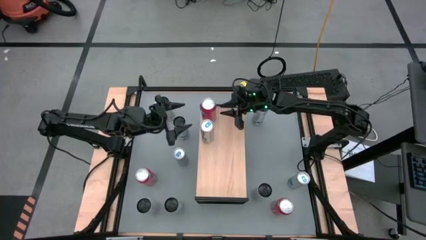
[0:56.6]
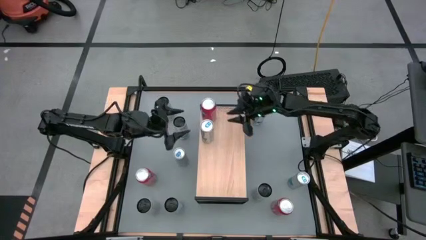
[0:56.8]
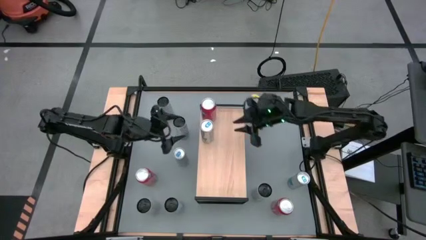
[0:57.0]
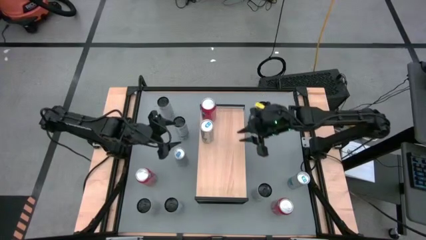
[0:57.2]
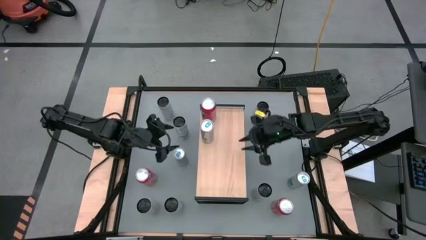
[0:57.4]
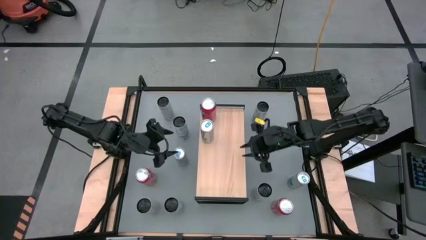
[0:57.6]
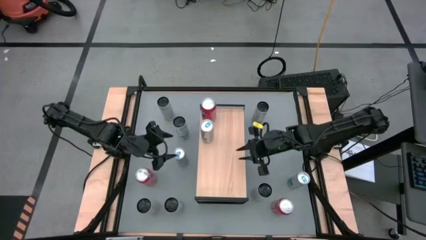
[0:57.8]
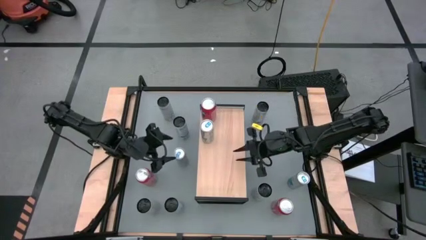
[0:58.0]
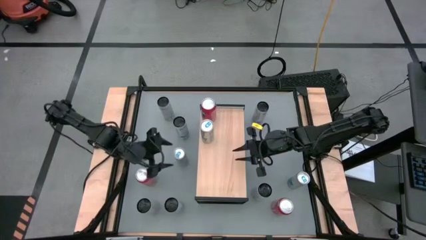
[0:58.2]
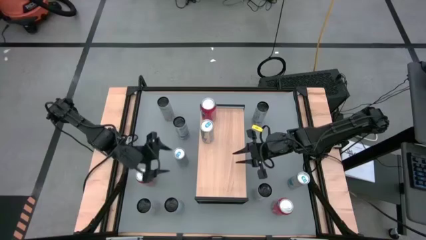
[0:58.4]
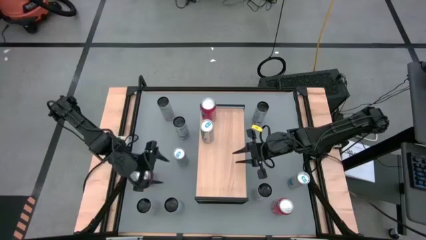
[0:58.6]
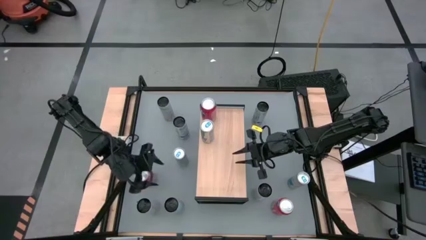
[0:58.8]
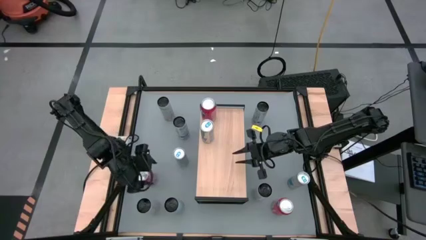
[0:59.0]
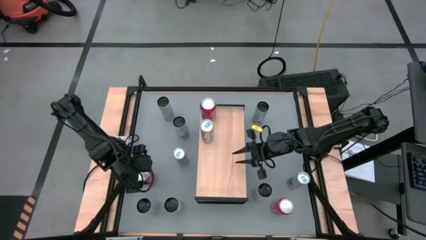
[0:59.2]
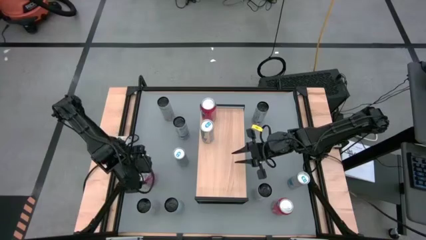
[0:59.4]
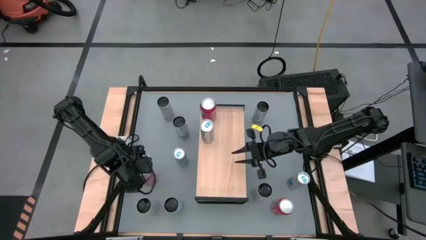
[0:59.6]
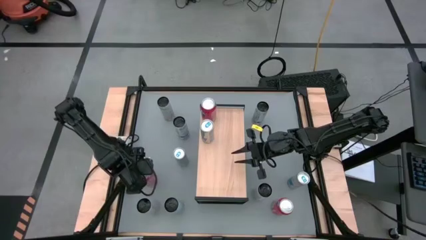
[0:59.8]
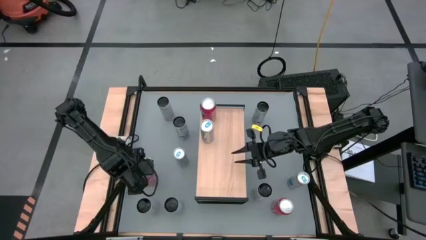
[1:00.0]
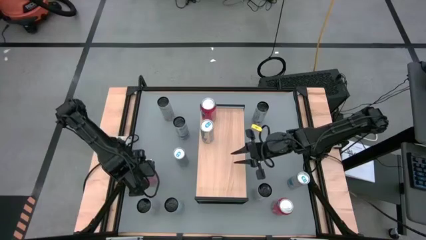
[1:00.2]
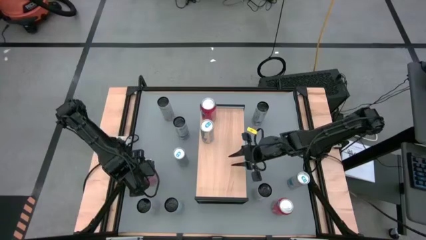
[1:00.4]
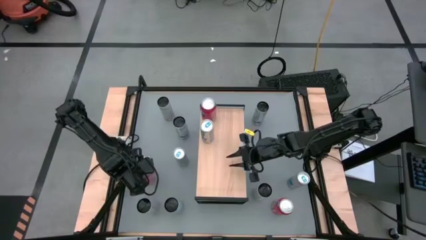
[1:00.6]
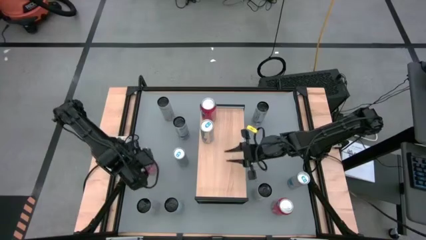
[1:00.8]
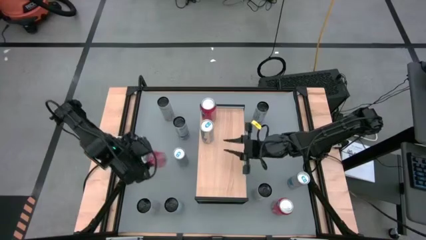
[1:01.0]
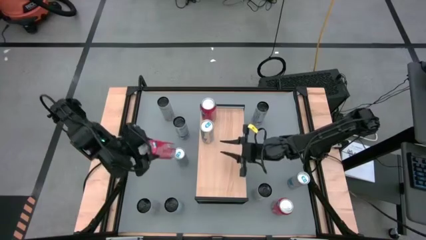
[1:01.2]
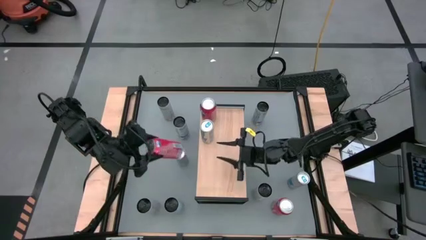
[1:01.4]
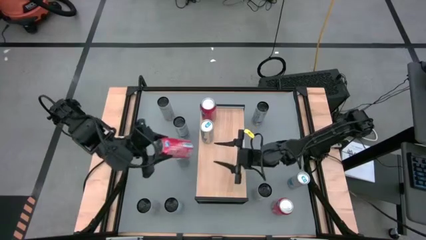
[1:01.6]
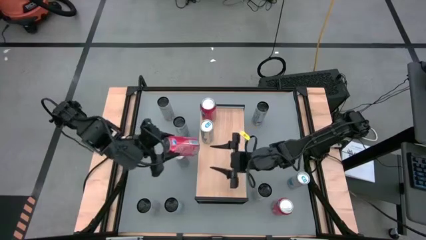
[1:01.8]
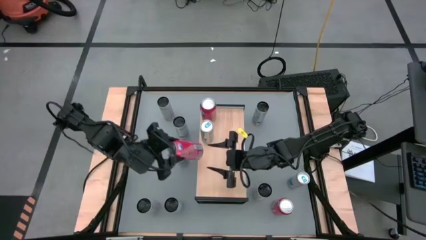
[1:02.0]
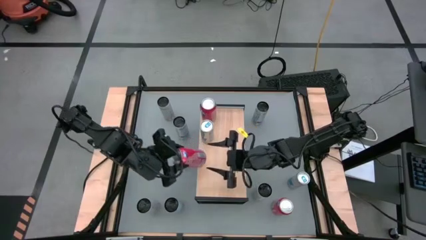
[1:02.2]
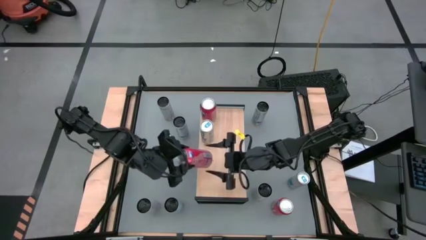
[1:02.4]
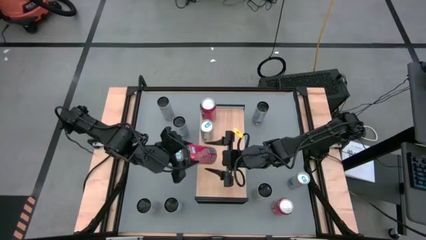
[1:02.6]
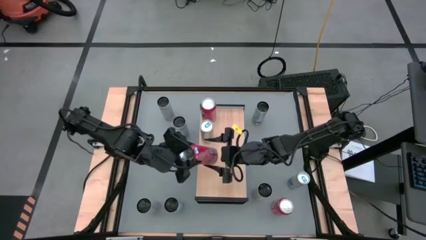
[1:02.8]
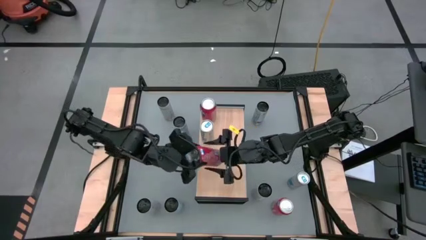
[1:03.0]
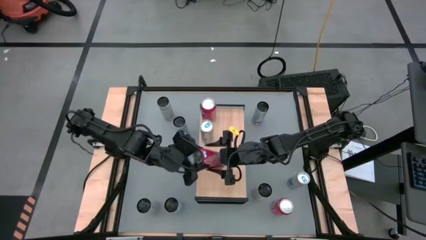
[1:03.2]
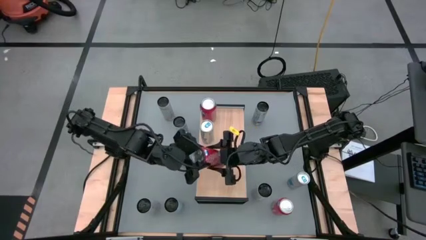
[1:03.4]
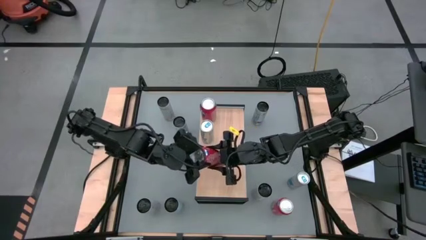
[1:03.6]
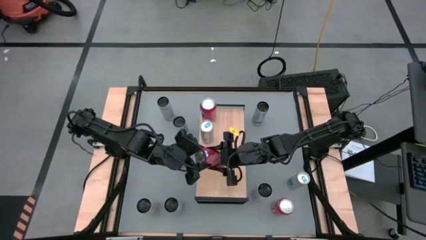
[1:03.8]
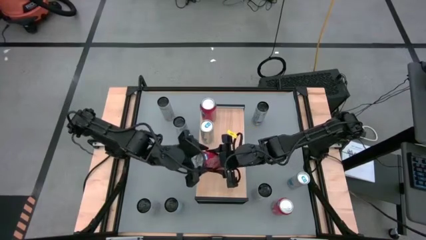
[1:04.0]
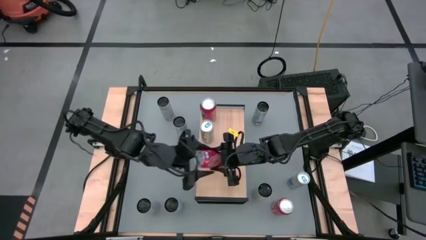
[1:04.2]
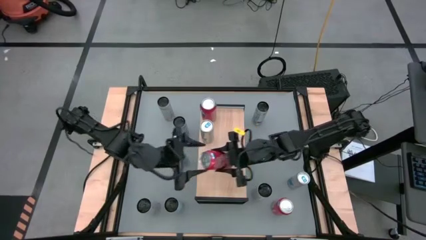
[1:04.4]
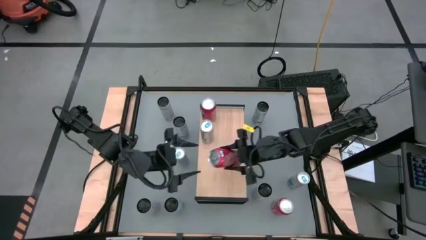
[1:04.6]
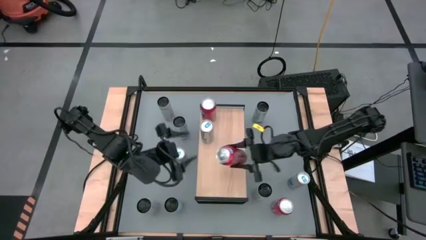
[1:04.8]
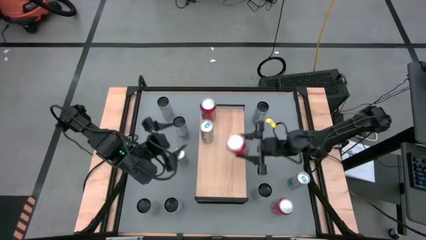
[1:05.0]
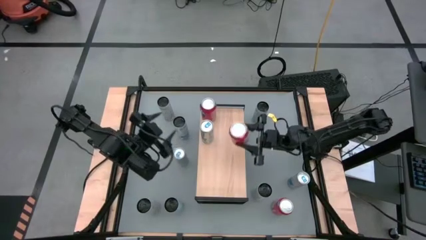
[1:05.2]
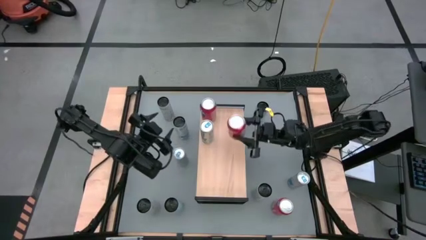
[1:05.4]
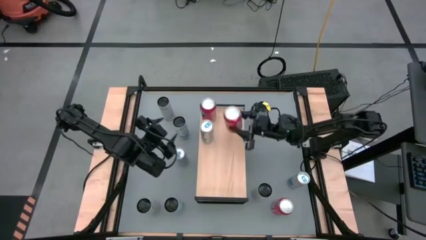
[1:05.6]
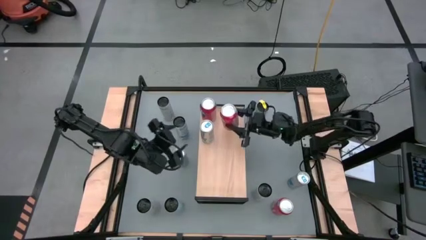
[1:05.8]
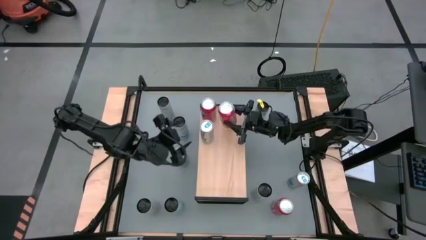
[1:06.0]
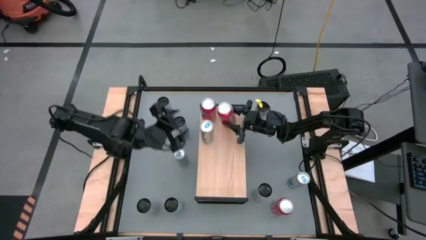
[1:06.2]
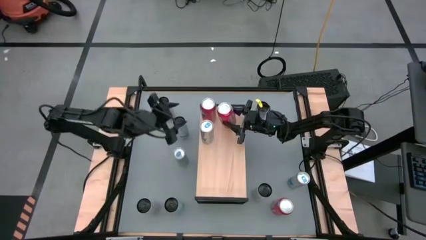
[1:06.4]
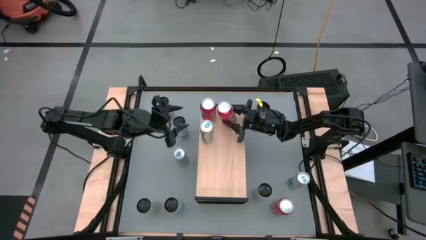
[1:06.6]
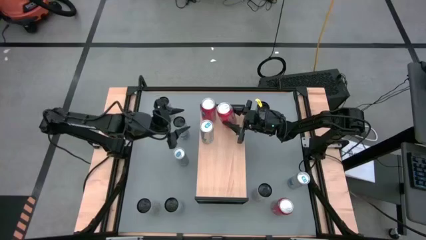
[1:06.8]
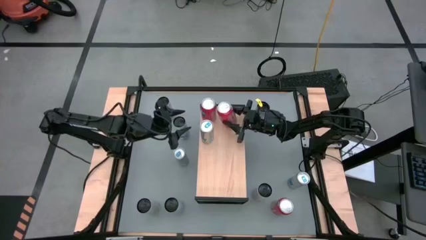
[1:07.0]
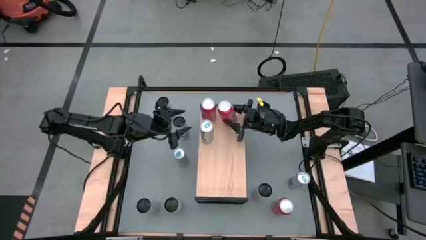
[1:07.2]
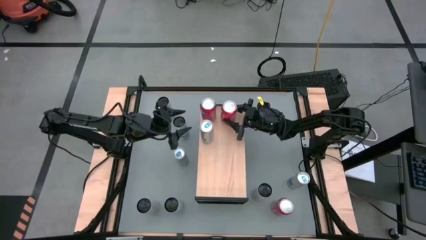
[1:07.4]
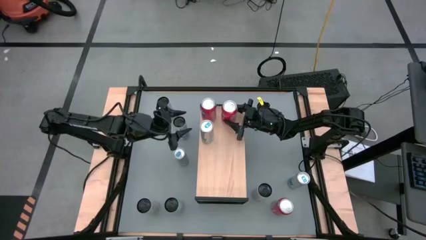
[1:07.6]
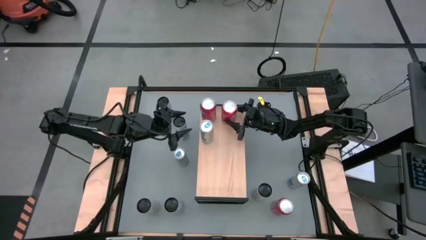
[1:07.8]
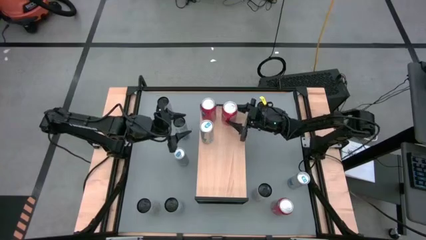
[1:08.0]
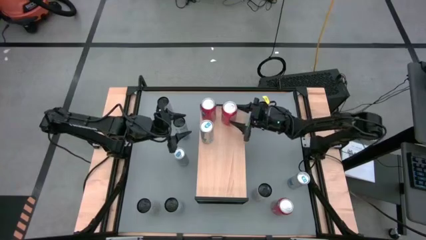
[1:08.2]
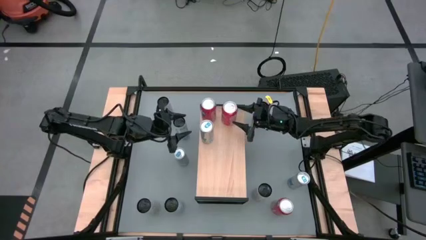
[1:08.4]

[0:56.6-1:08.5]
Task: Place canned beverage on shelf
Put the left orange soda can on the shelf
